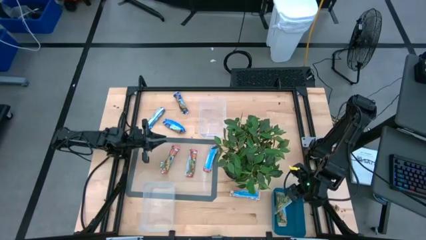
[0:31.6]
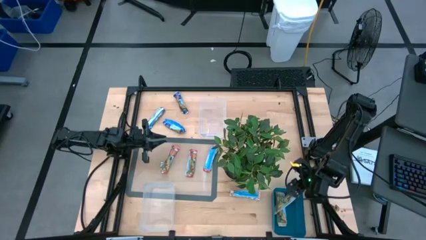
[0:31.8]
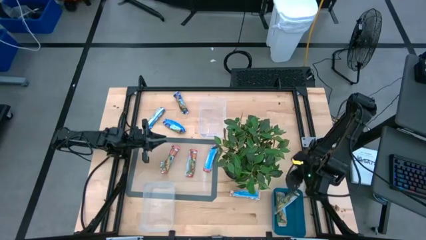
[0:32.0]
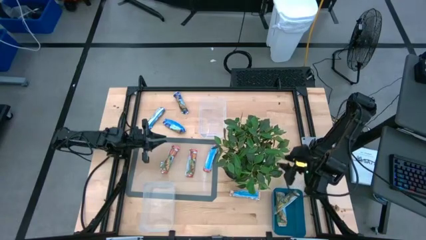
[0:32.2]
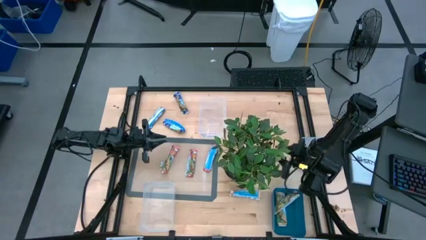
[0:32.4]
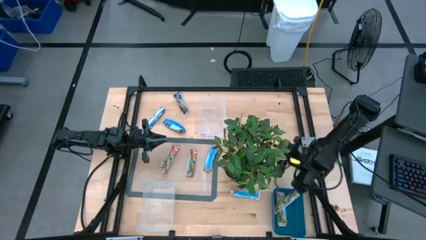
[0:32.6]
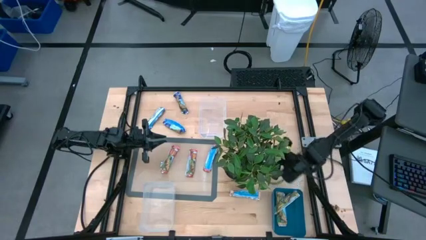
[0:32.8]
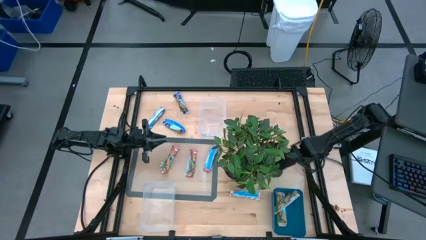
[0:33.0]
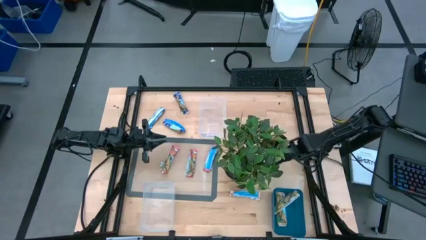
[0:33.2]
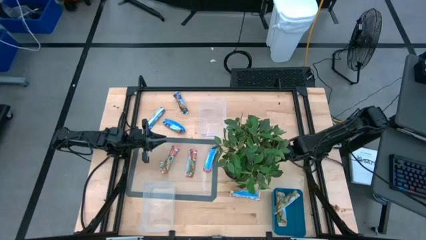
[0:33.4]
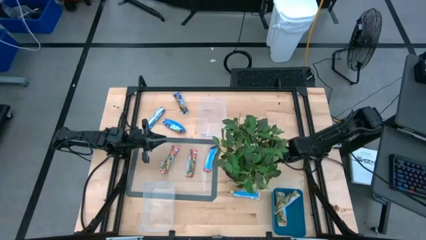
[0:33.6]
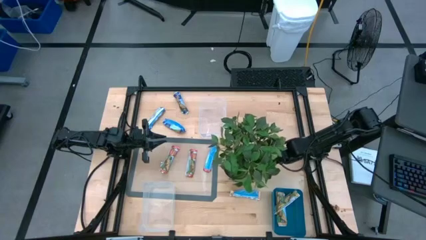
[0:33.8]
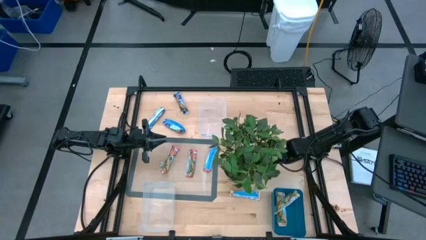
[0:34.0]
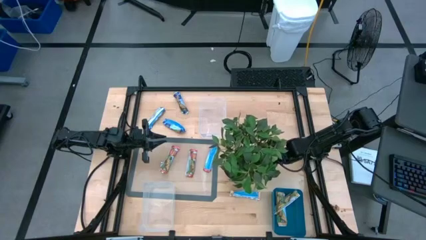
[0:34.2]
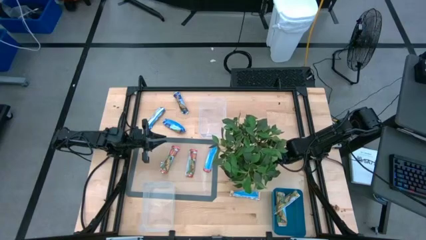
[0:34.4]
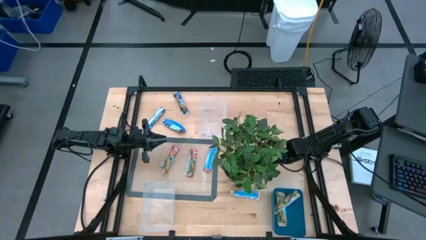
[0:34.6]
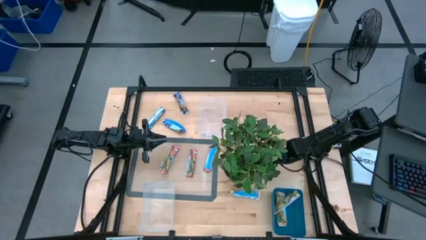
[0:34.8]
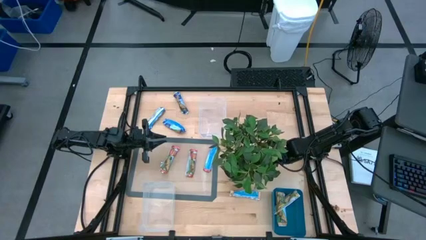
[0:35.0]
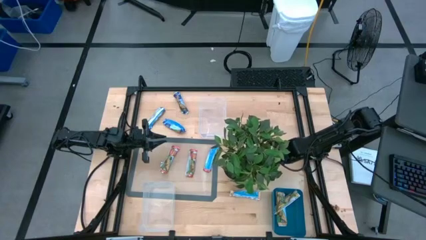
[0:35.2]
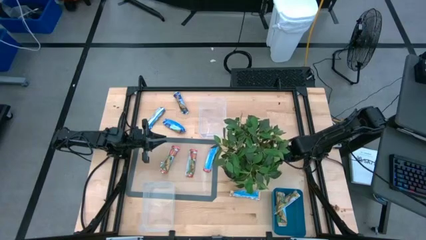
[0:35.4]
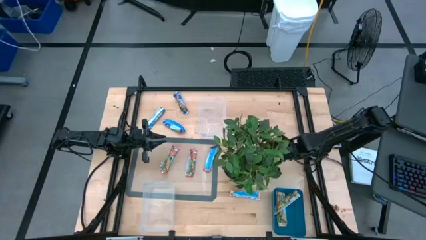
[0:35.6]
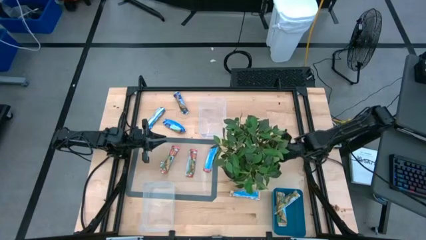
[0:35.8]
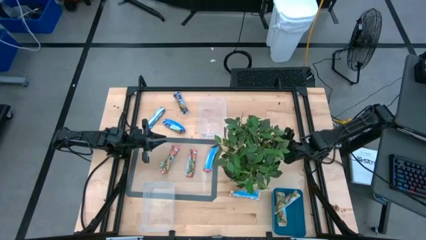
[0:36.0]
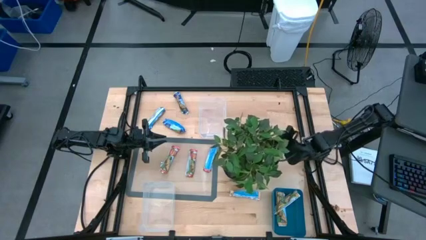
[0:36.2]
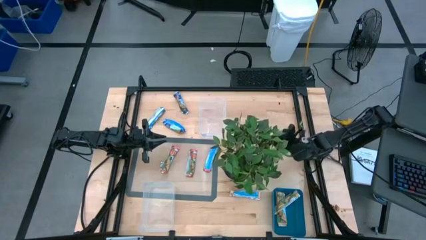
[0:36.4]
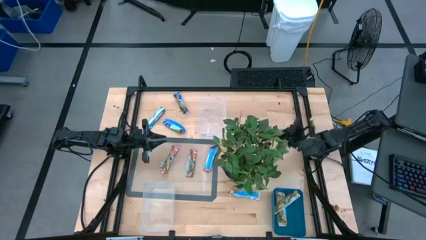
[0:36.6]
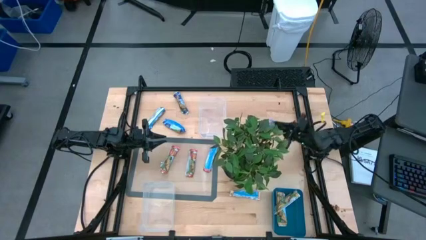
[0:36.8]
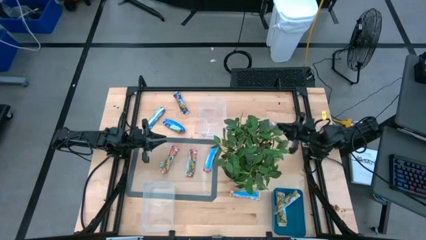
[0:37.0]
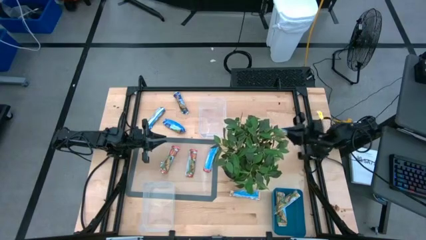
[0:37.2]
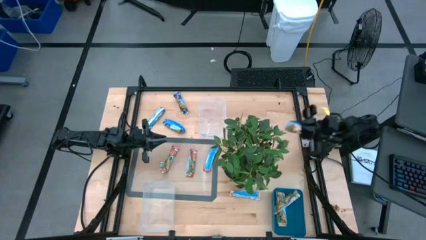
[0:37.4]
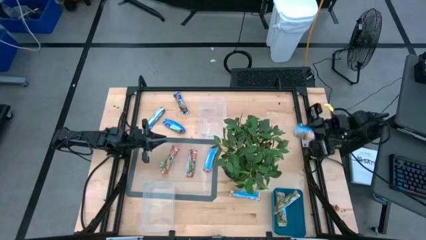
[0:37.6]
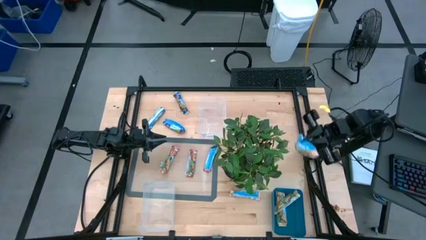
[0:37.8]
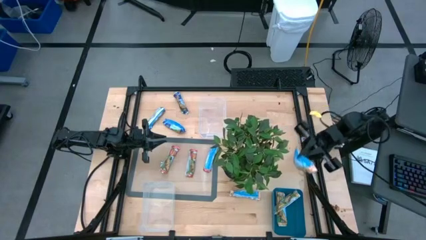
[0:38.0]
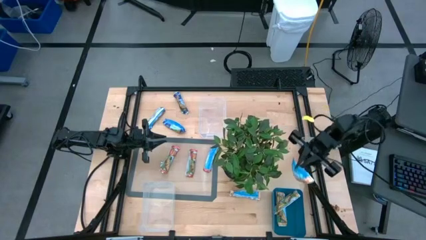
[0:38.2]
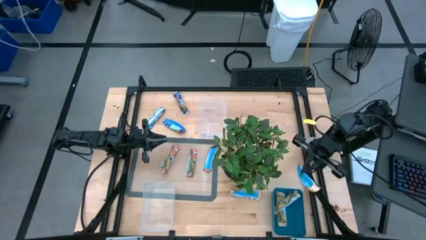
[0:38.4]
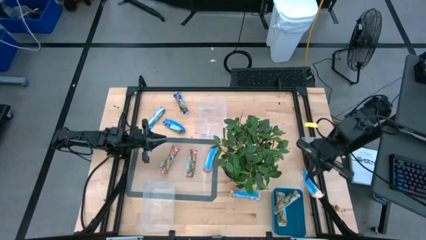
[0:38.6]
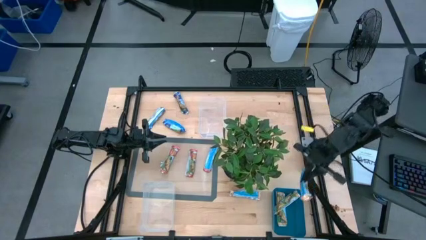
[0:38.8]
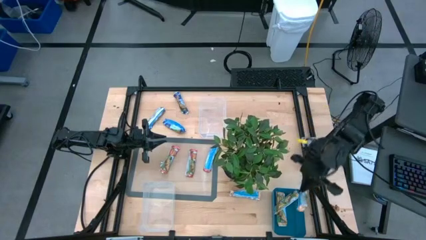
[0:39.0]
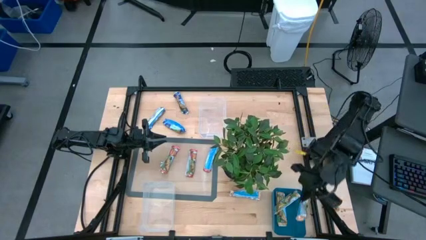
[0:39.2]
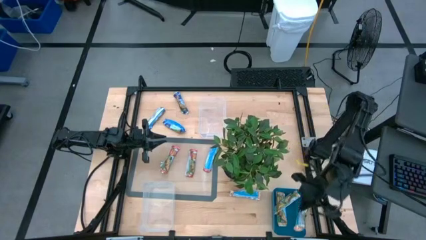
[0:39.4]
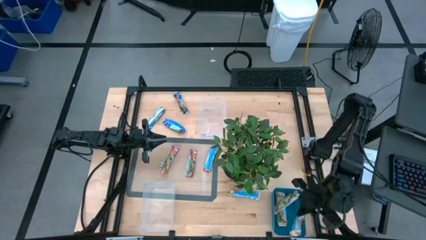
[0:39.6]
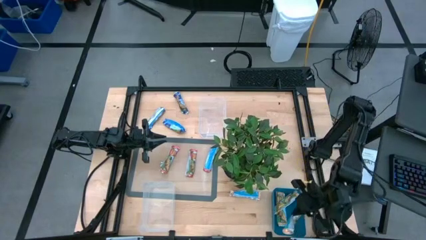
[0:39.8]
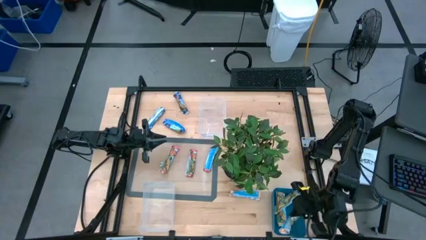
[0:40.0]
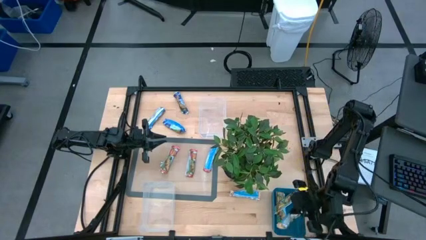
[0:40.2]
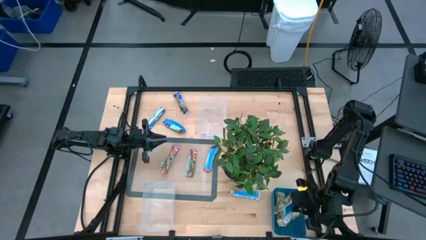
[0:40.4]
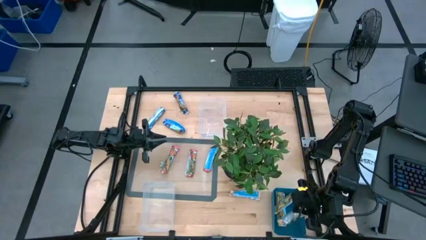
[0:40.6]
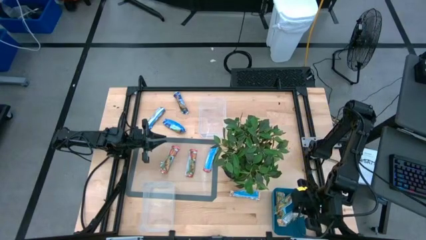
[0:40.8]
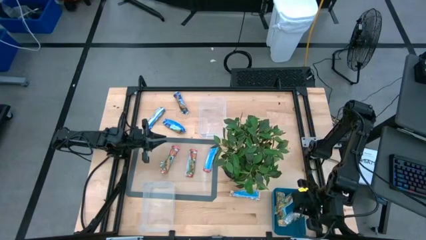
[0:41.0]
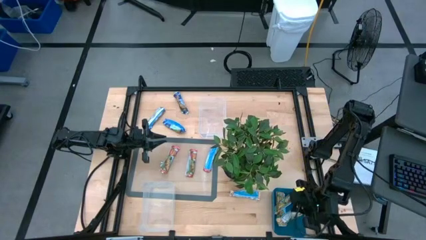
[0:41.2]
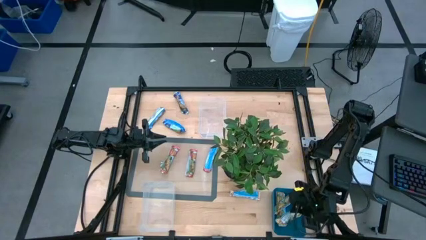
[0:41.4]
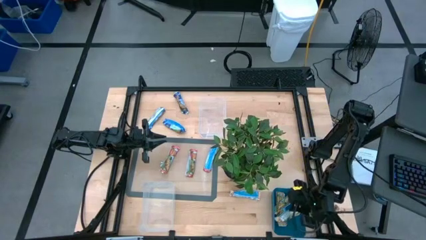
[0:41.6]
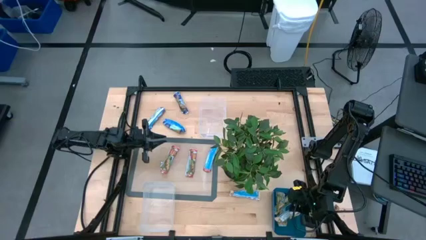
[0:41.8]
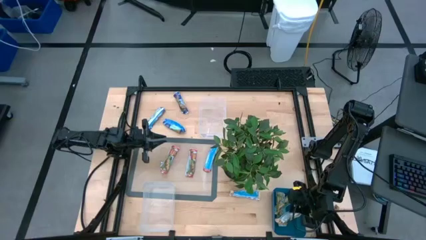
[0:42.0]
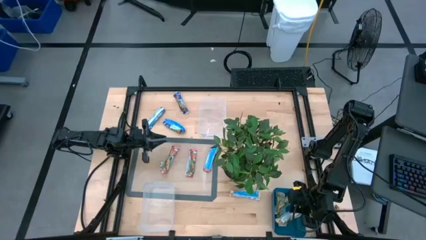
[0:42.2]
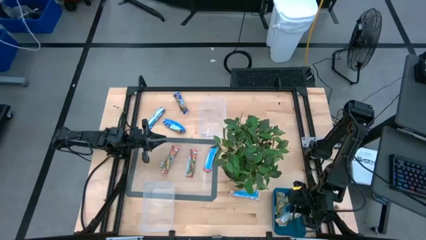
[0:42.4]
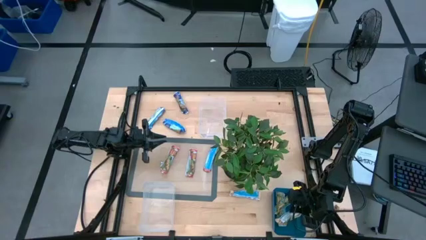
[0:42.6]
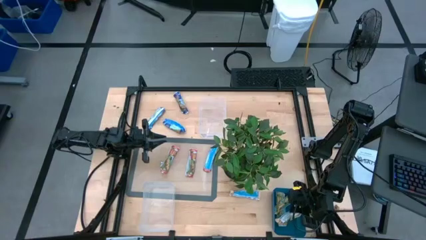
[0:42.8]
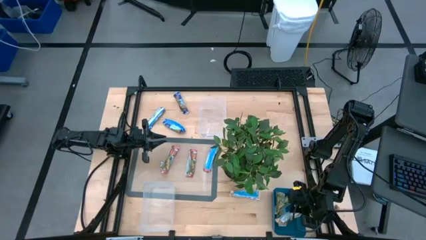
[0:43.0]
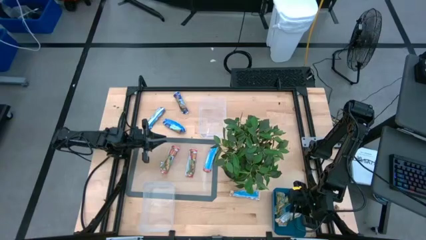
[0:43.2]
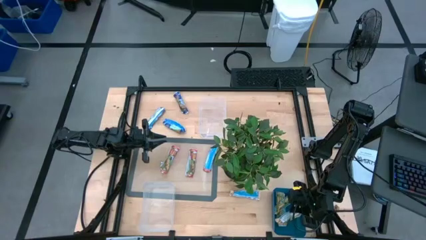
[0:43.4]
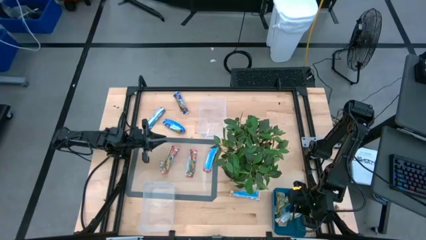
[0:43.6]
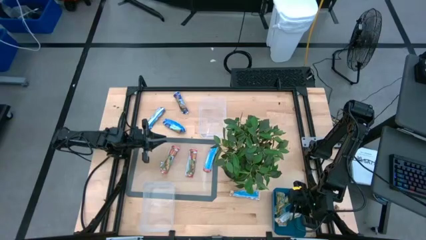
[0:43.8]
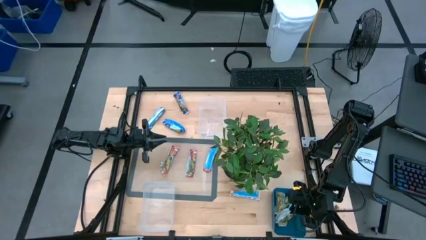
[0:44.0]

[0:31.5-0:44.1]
Task: Pick and place Granola Bars by type
Put the green granola bar into the blue bin

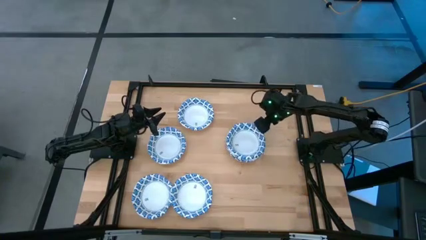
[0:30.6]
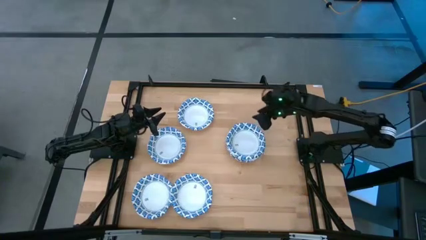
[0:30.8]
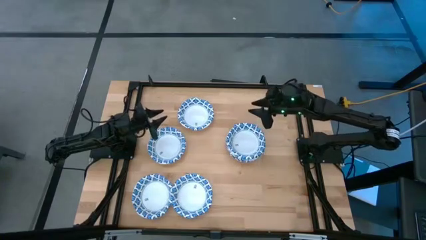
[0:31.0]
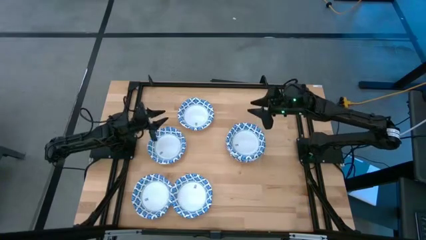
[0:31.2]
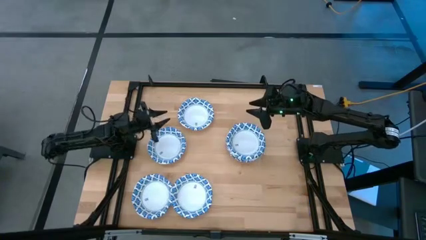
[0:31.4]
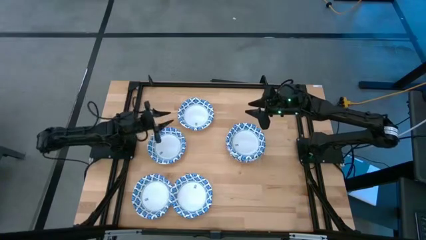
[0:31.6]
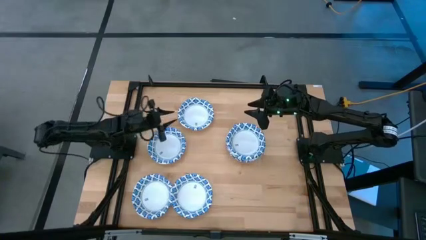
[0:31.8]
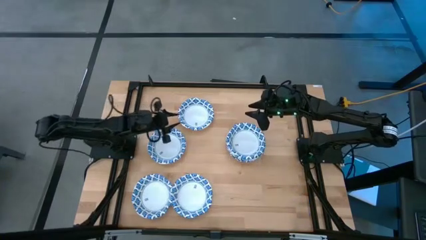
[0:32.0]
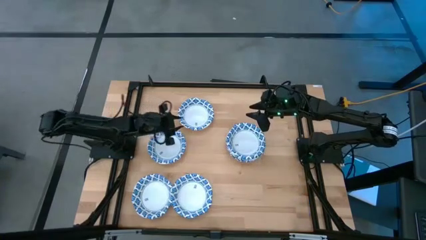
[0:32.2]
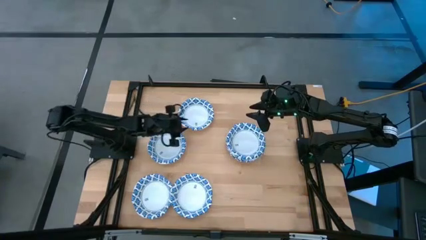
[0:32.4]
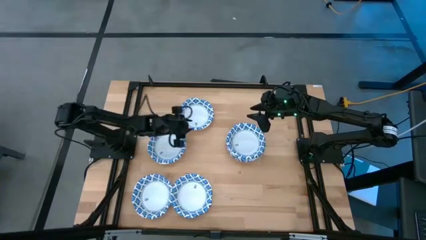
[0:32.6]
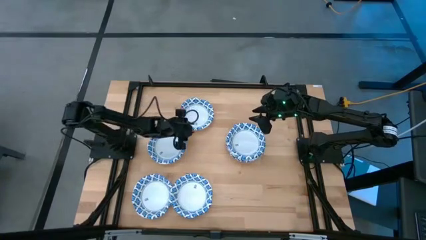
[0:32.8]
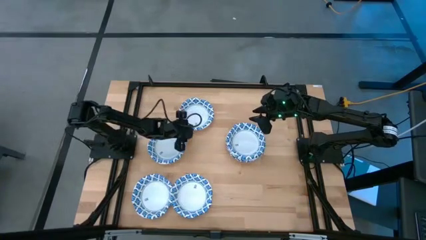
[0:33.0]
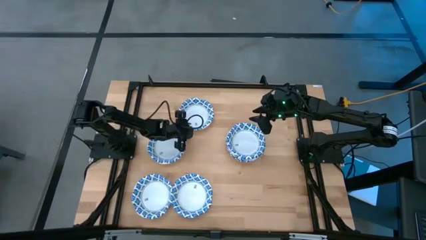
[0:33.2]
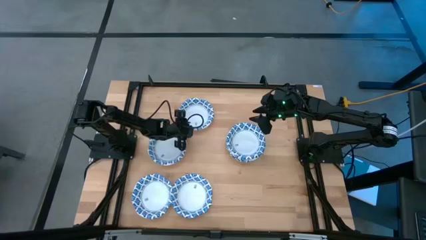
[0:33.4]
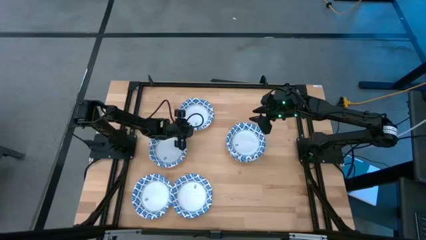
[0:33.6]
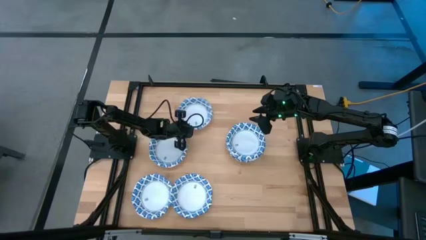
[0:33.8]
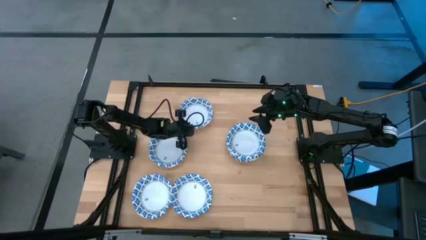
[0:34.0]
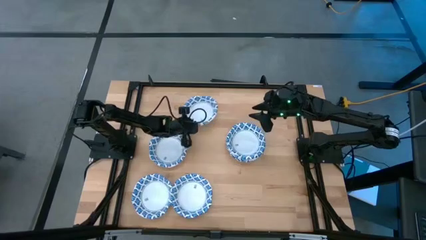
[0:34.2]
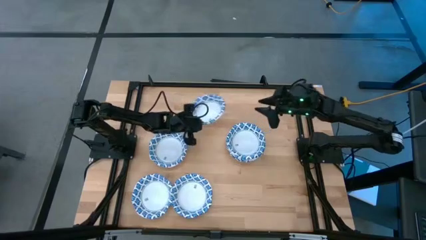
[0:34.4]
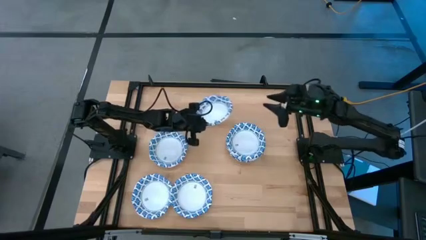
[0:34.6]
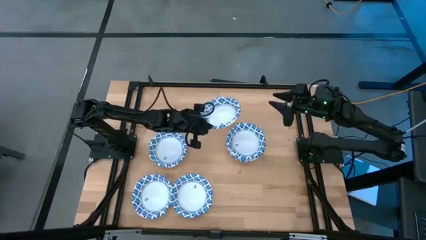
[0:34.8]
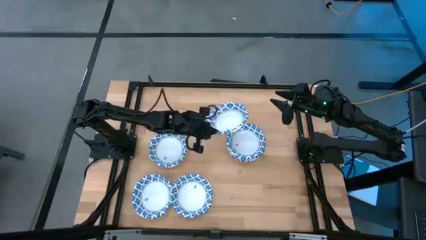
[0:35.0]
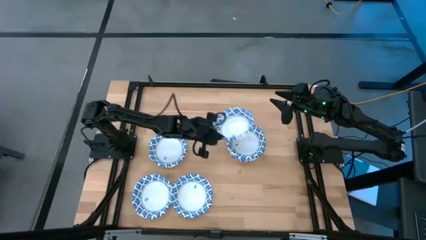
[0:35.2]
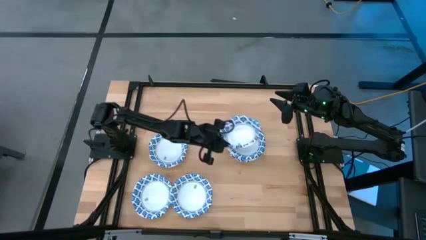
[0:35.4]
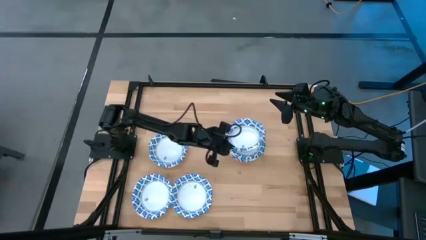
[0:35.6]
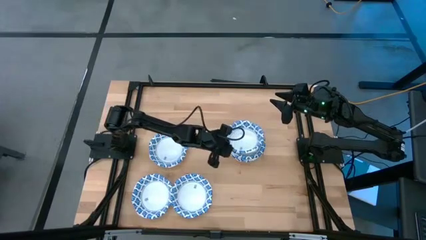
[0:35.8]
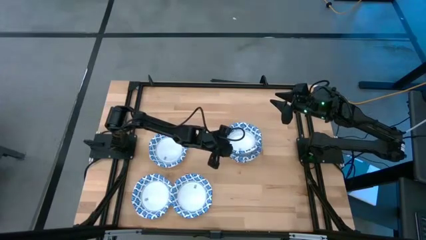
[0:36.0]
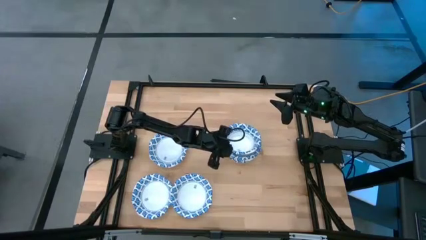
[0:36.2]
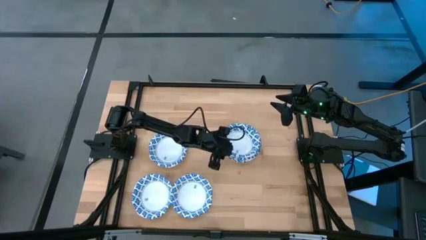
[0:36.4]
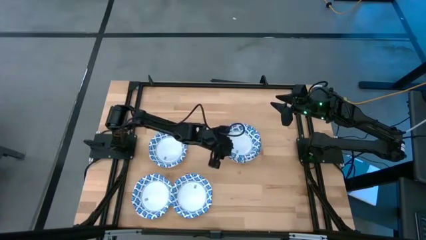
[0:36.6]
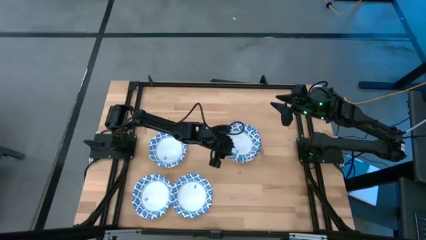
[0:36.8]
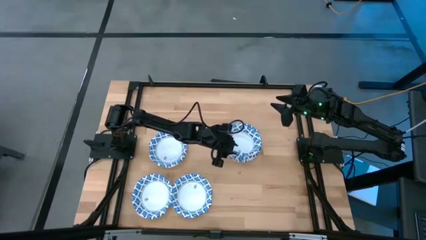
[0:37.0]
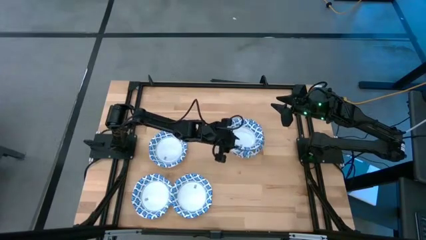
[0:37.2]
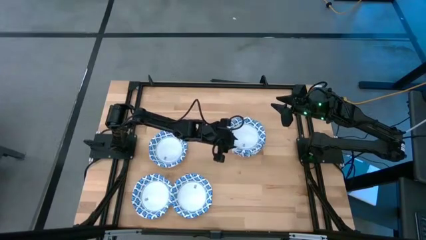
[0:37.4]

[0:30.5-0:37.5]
Task: Nest bowls inside each other
Stack the white bowl on top of the white bowl
